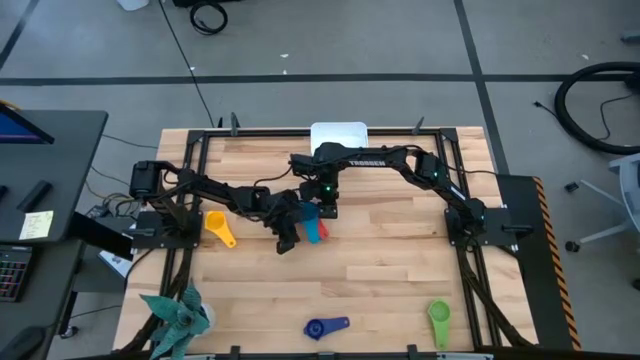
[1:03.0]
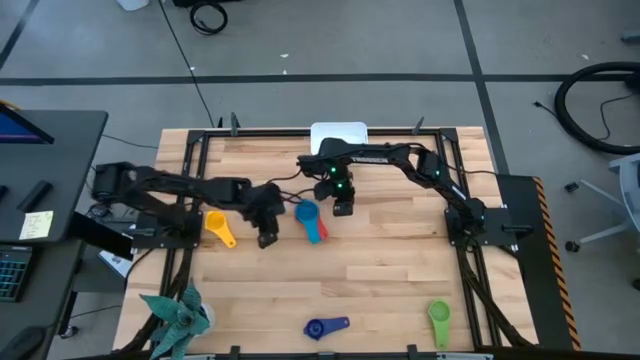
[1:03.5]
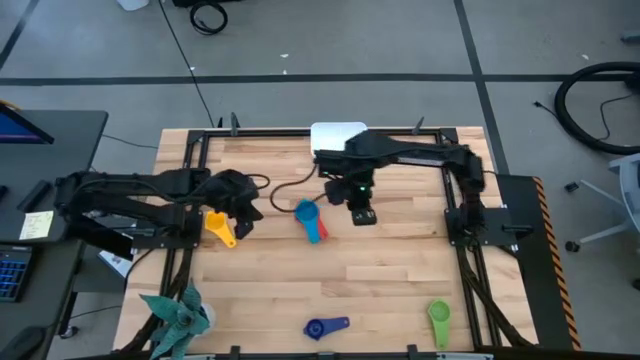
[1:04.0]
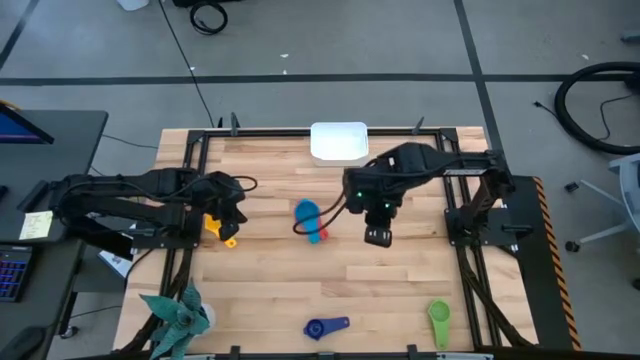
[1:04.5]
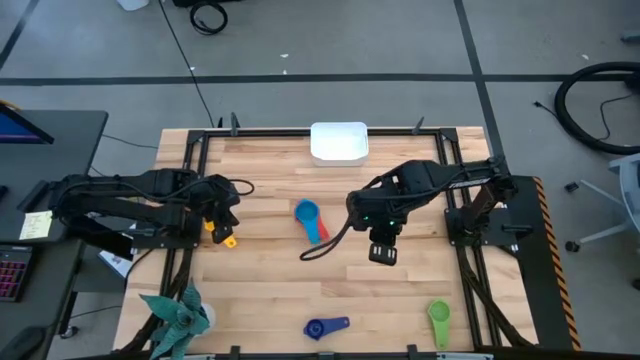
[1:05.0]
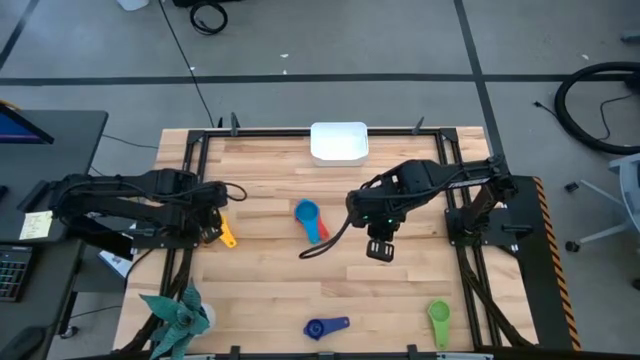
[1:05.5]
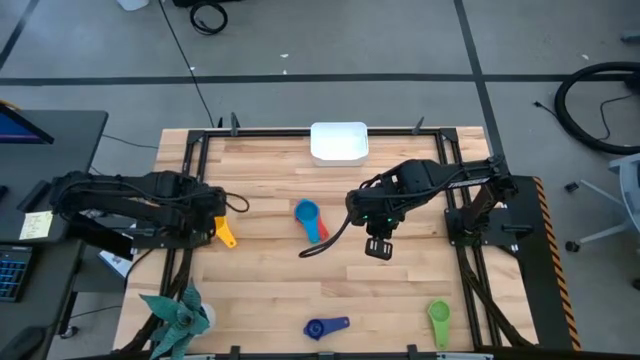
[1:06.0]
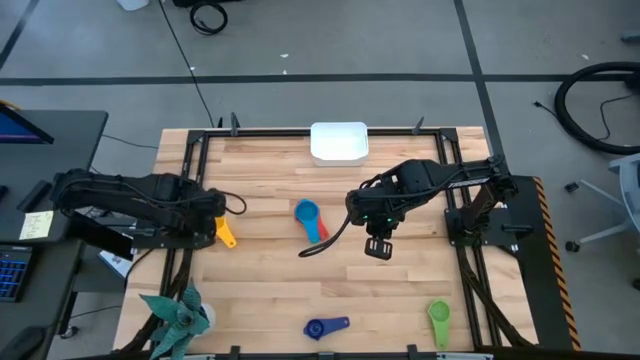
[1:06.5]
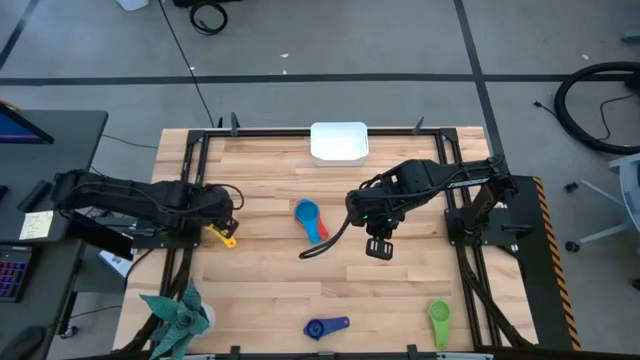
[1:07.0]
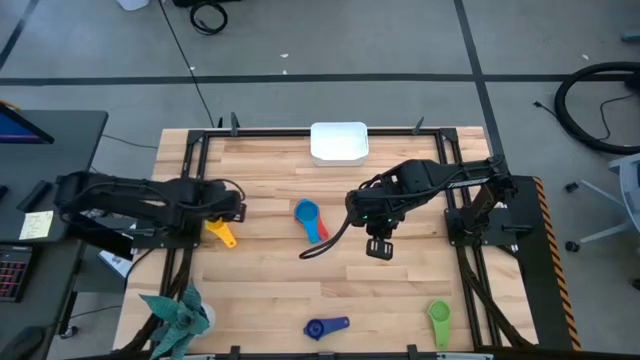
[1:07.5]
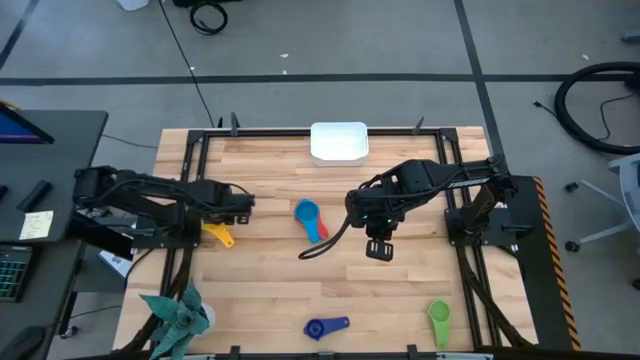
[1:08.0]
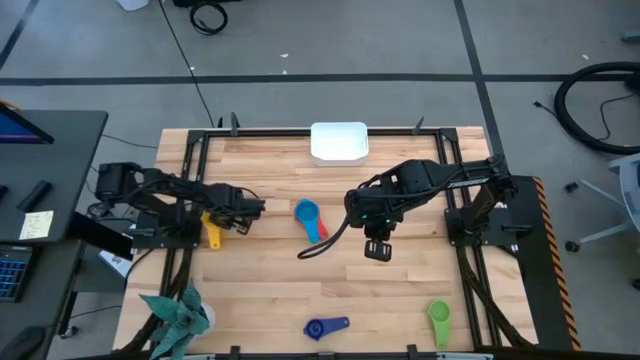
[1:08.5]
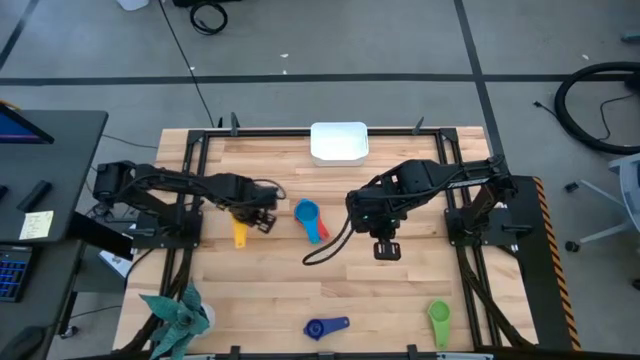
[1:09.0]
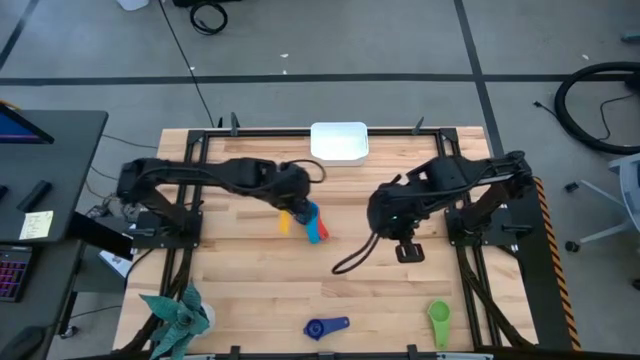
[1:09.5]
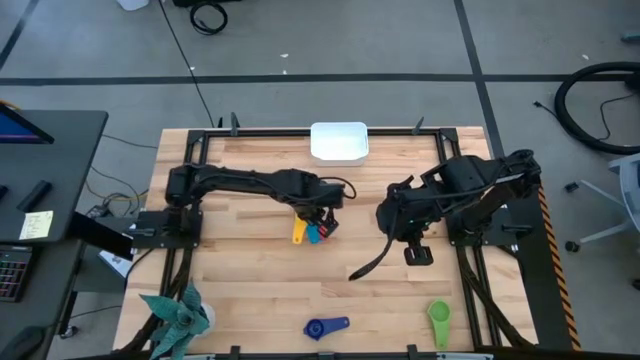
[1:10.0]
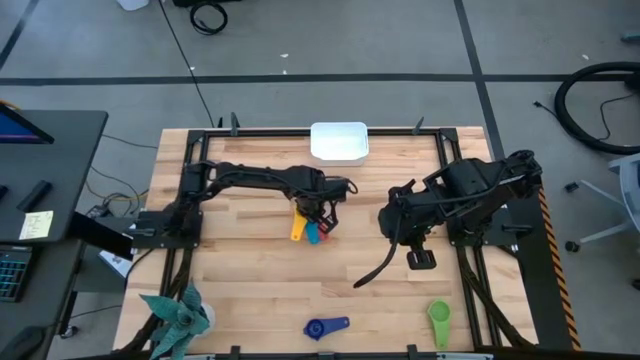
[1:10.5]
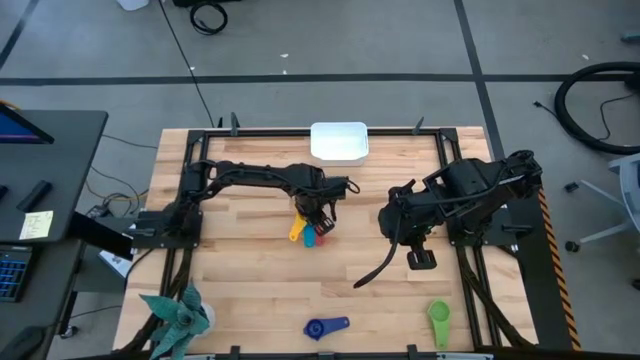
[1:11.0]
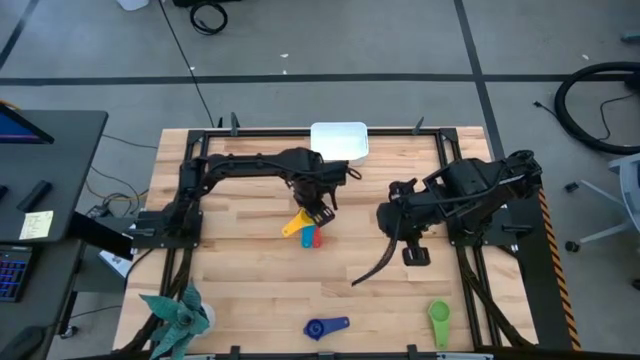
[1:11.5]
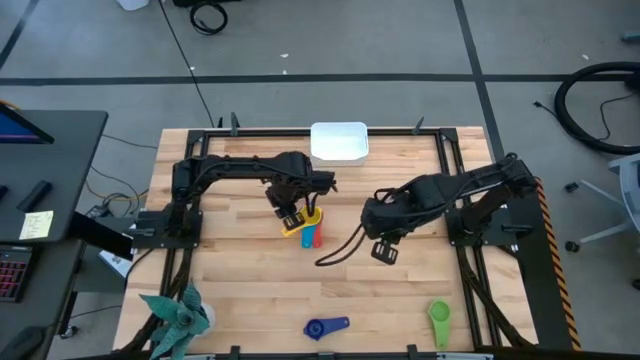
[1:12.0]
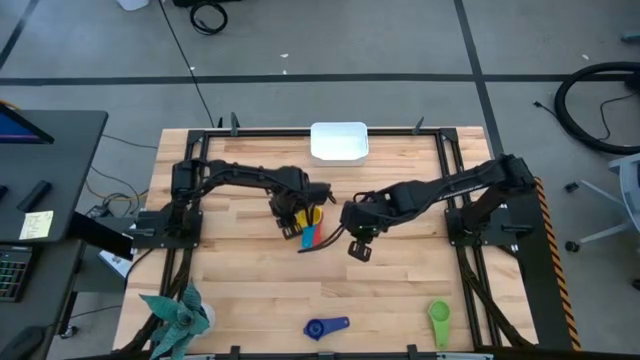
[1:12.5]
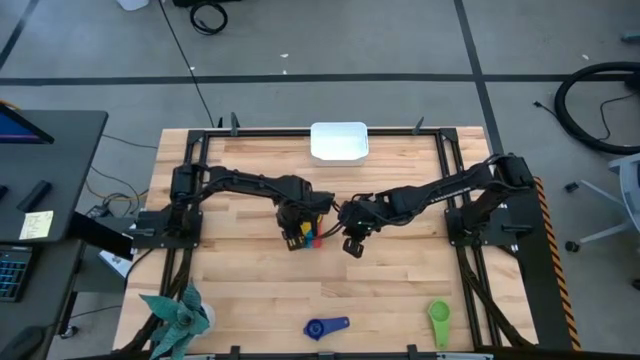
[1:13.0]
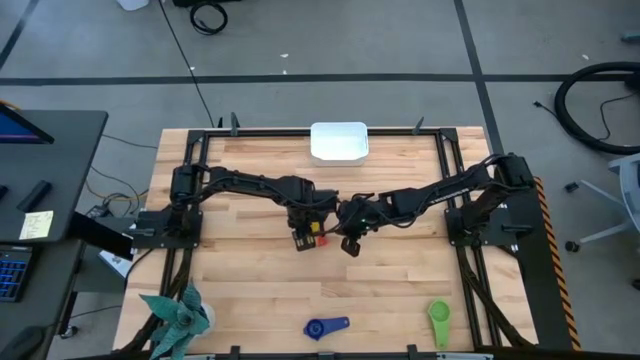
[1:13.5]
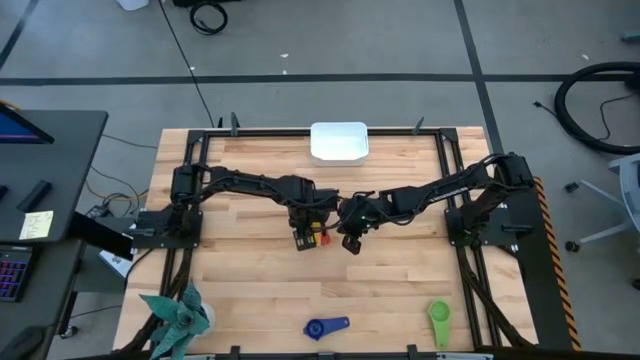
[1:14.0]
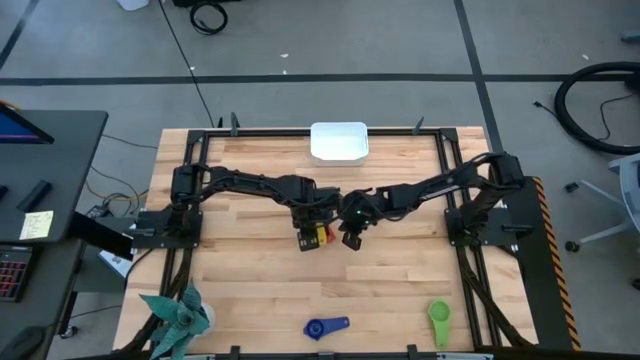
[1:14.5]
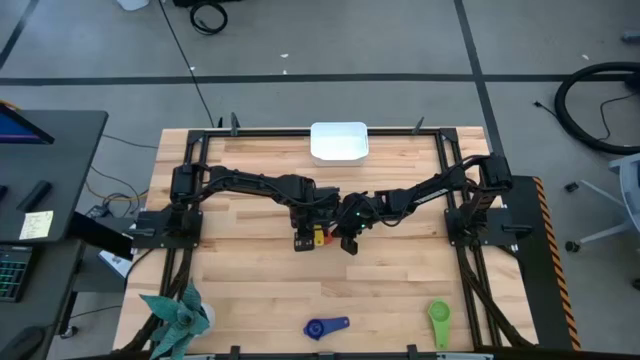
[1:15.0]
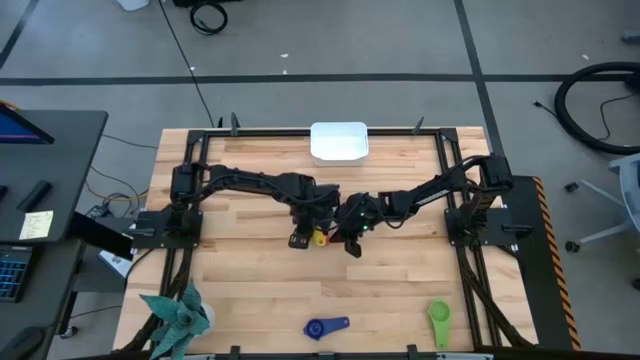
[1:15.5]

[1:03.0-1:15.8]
Task: Nest measuring cups in basket
Stack the yellow measuring cup on the light blue measuring cup

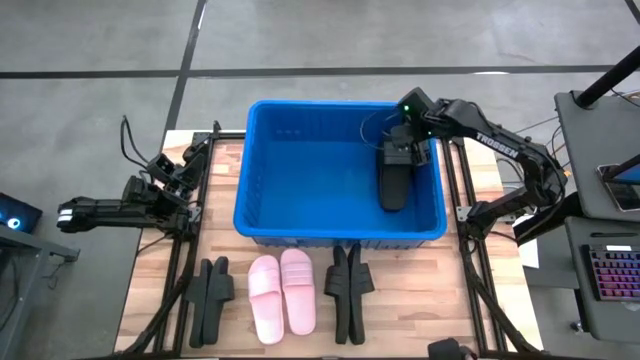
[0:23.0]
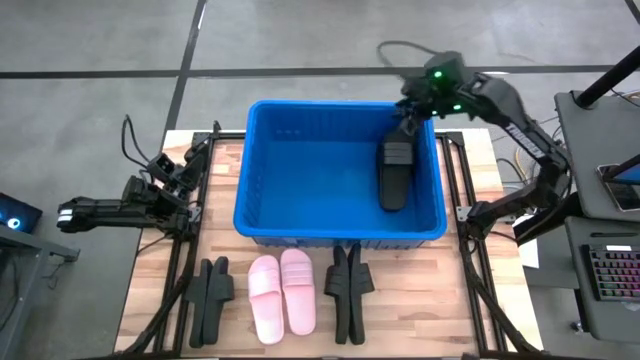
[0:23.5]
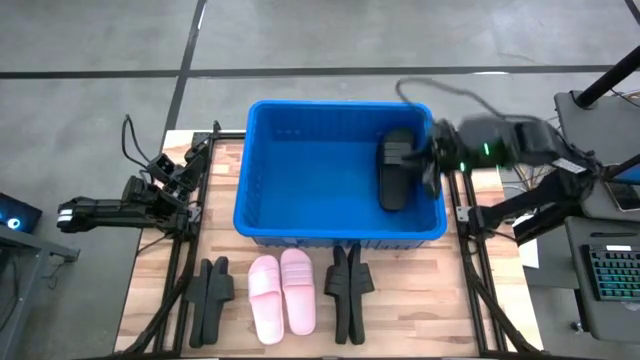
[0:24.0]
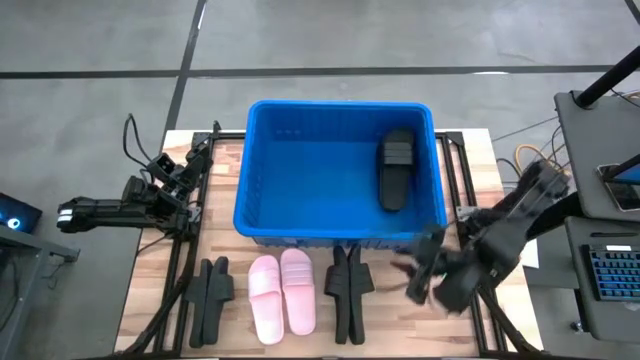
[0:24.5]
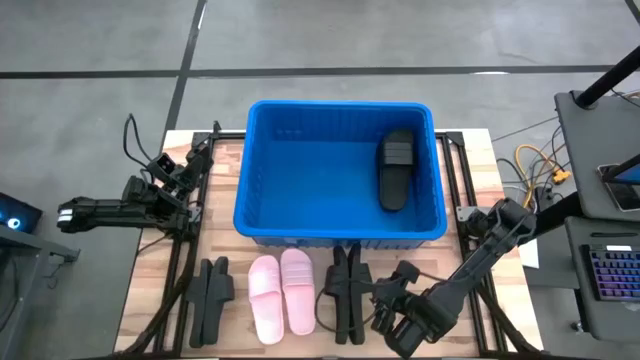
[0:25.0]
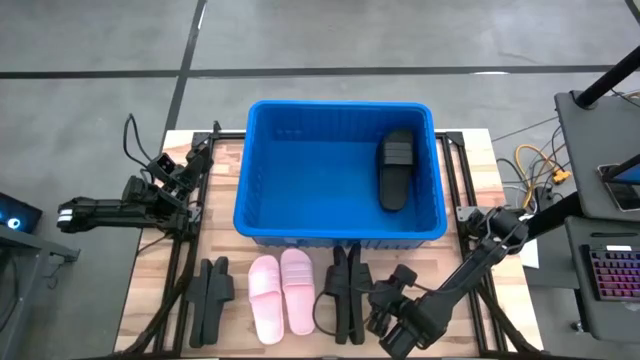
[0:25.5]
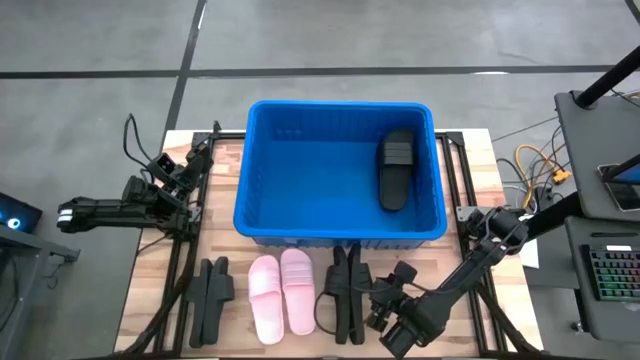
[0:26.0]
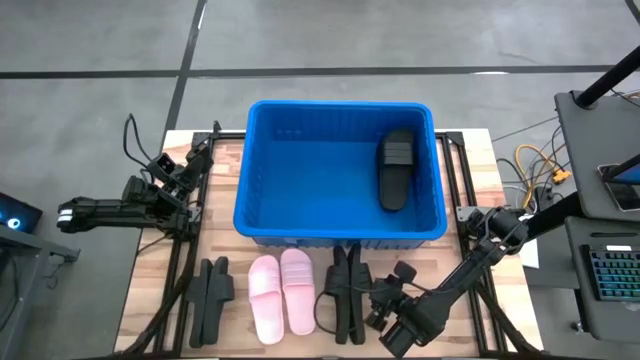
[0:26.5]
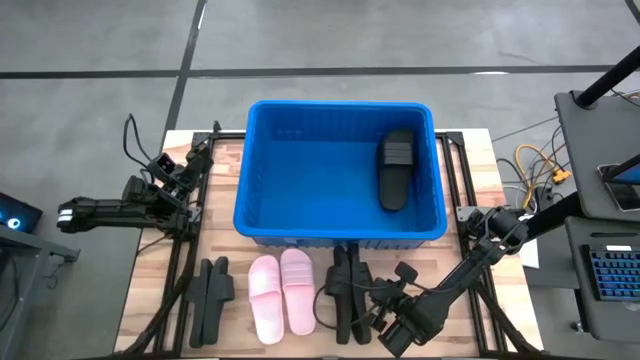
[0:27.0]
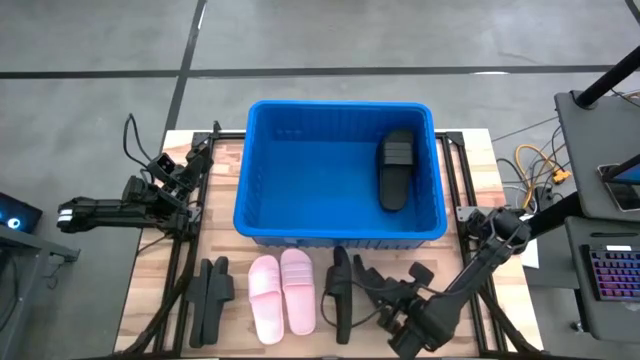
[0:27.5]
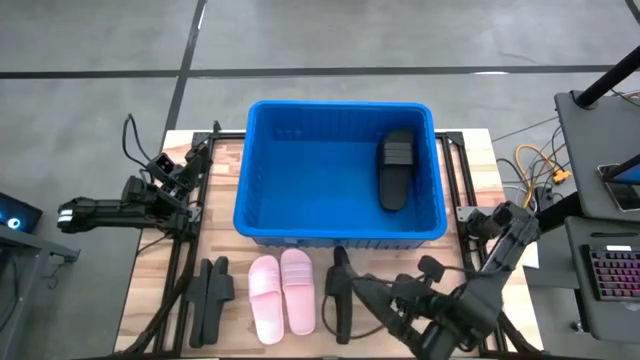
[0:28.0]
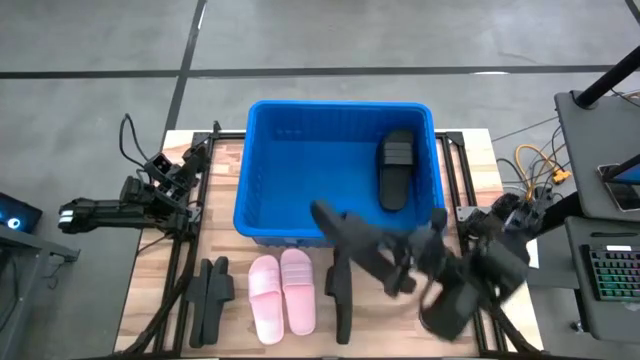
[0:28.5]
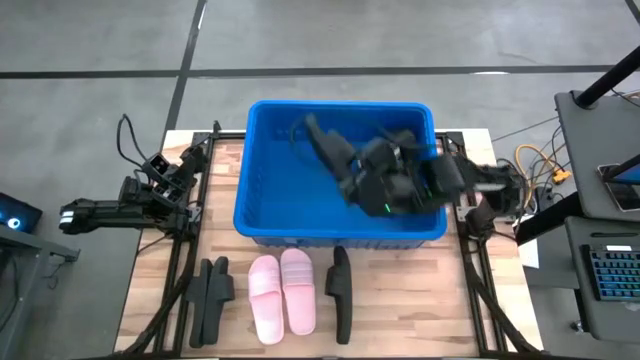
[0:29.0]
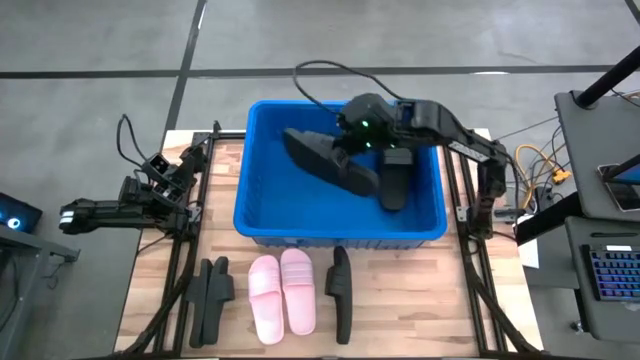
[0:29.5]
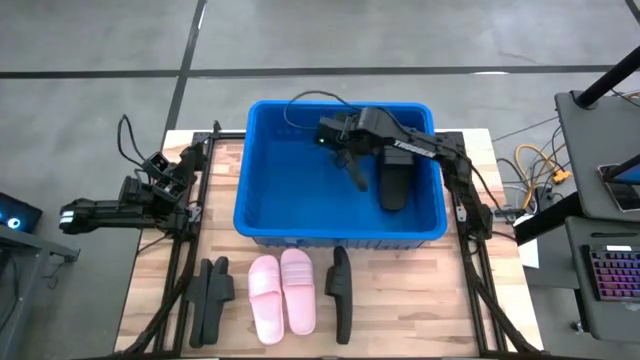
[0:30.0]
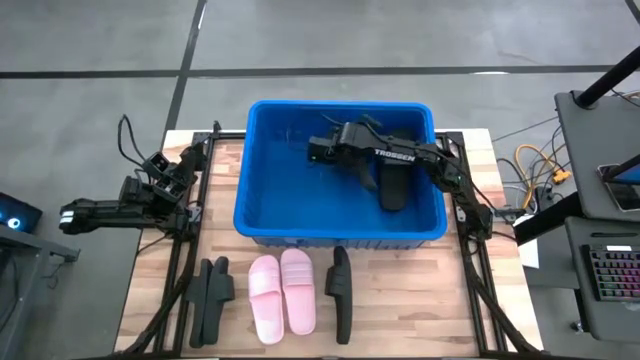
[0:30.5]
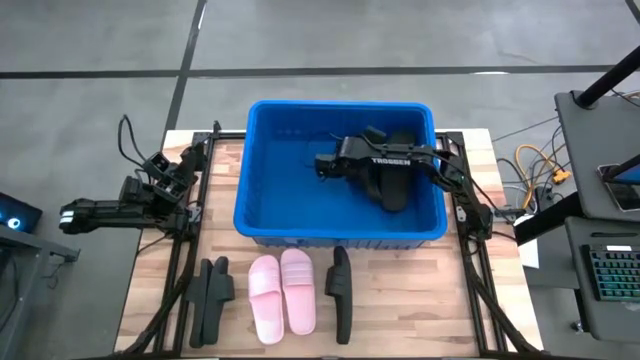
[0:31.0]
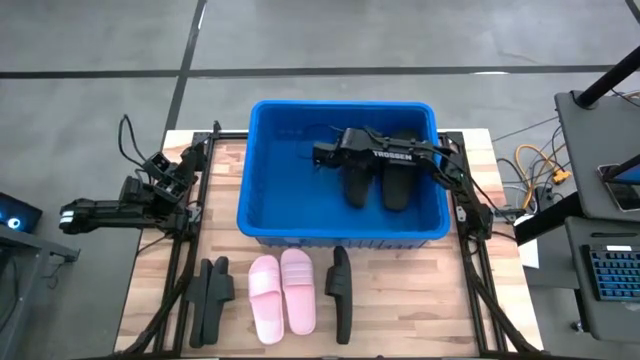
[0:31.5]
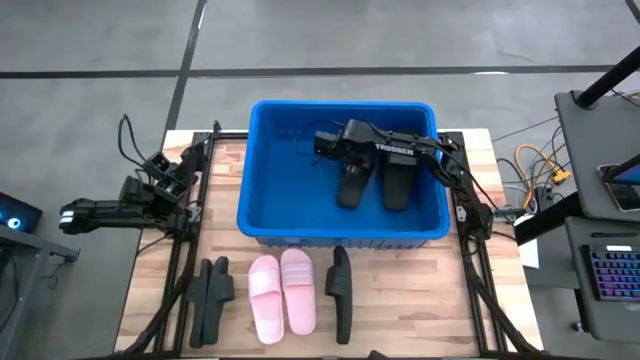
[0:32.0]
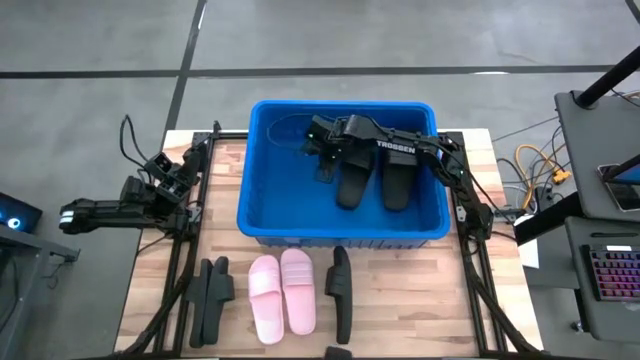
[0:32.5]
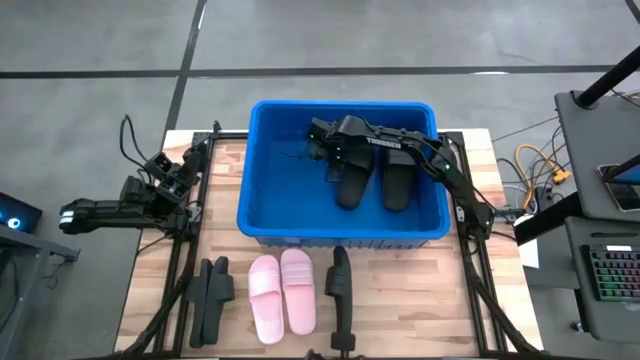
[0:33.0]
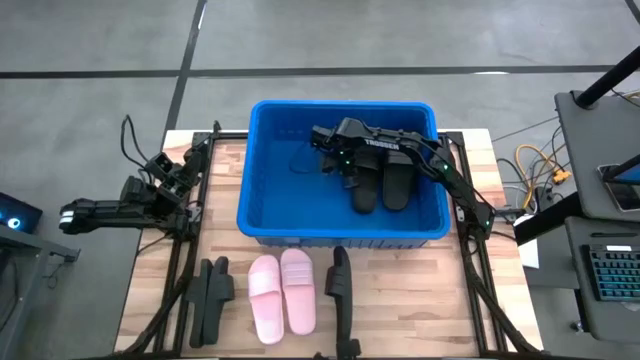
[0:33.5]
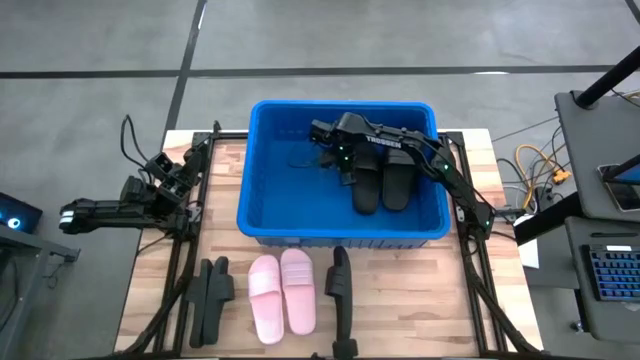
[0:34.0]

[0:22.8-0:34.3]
Task: Pick and place slides into bin
Put the black slipper into the blue bin
